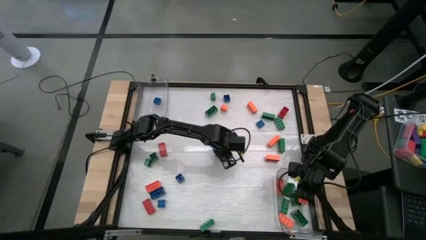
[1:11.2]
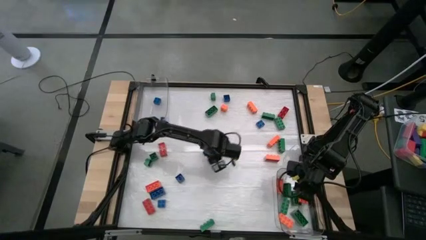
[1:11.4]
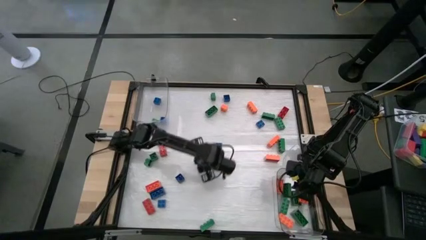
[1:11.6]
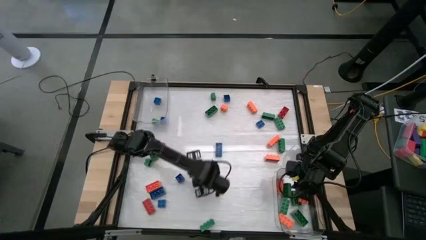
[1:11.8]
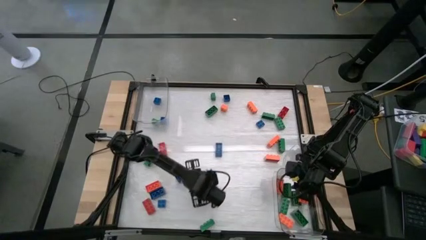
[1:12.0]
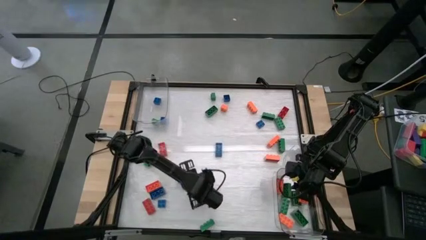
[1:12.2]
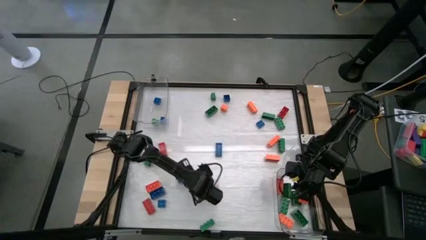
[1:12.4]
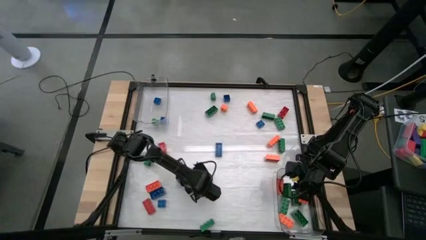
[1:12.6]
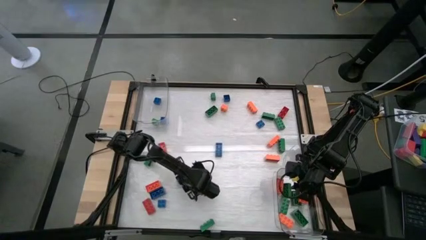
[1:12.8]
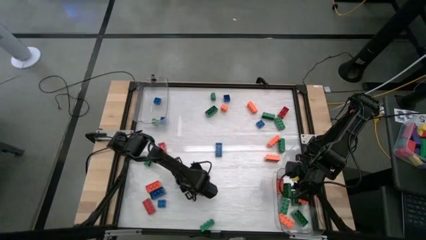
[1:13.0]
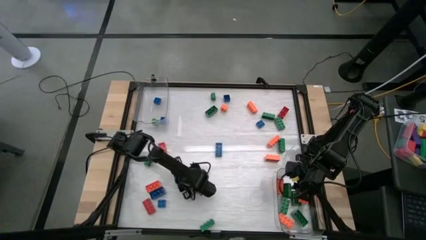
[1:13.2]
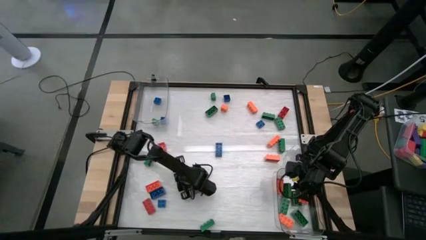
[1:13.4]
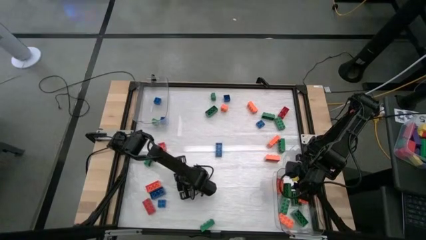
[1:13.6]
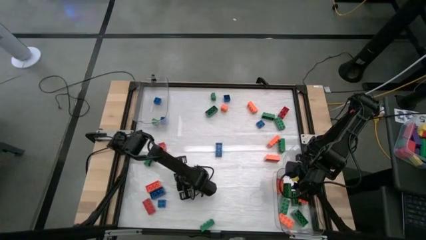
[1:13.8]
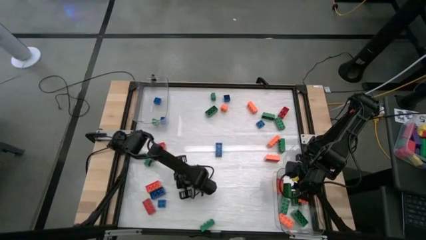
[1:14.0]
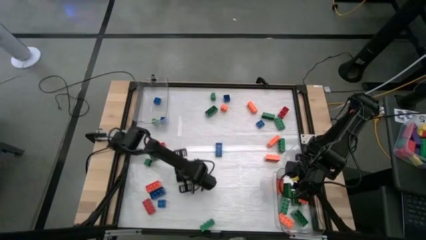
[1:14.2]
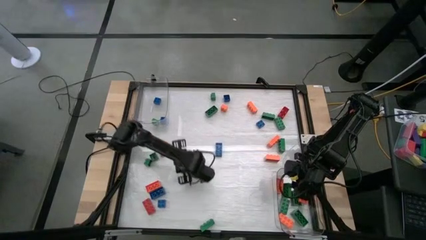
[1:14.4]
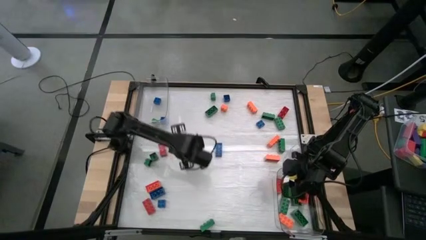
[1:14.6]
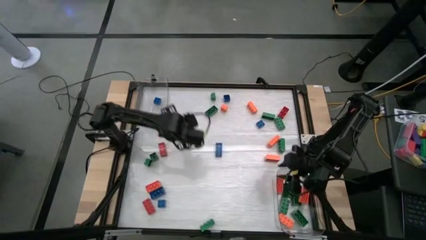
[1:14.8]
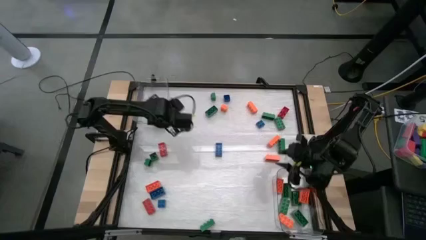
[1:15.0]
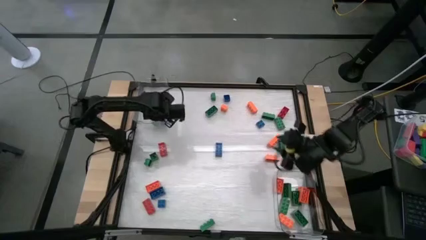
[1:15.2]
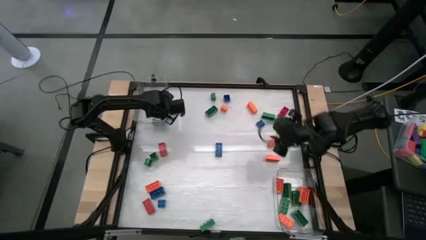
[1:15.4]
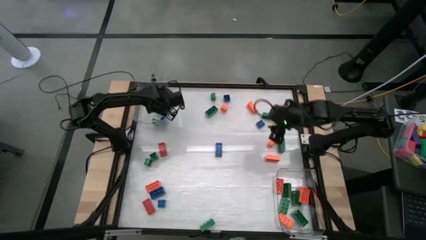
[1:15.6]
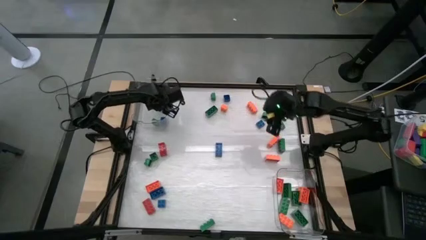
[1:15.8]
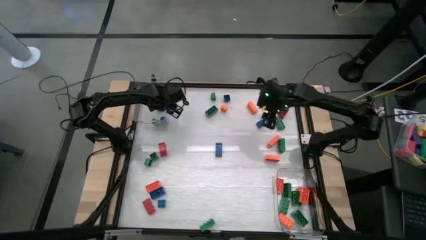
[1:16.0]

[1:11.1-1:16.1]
Task: Sort blocks by size
Put the 4 stud blue game piece into the top transparent bin

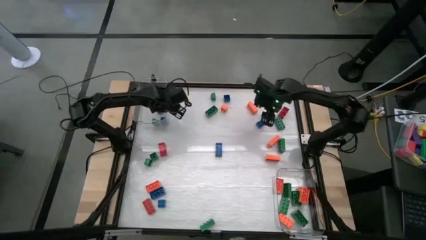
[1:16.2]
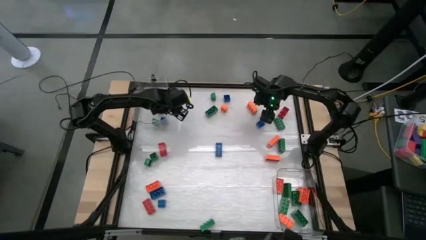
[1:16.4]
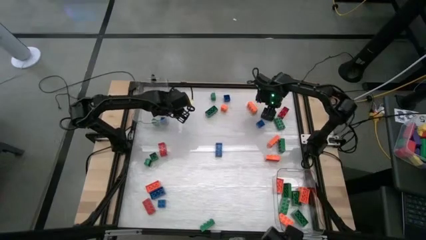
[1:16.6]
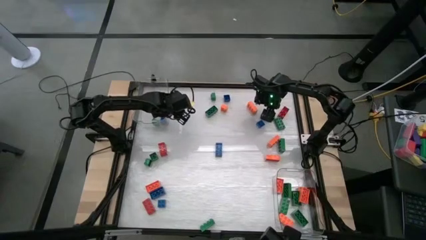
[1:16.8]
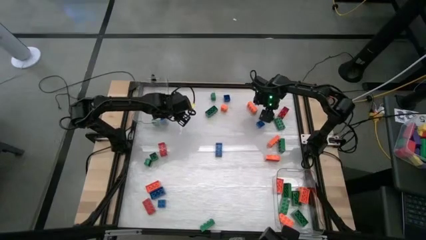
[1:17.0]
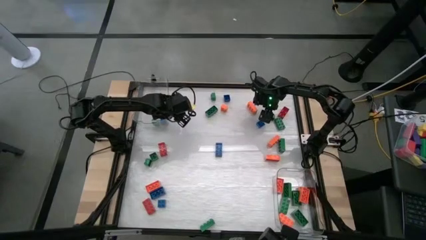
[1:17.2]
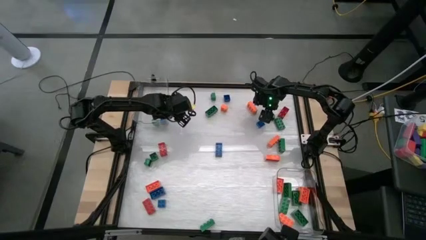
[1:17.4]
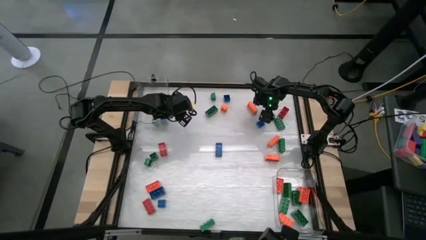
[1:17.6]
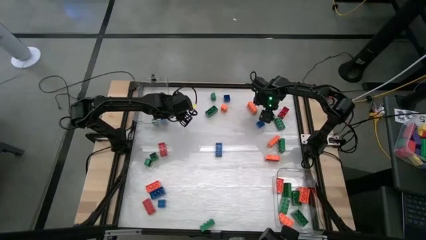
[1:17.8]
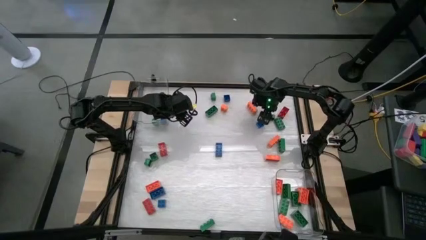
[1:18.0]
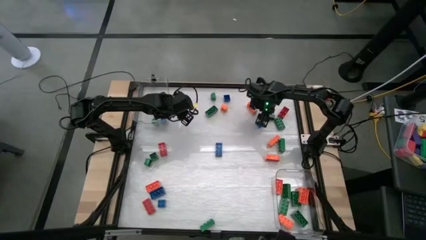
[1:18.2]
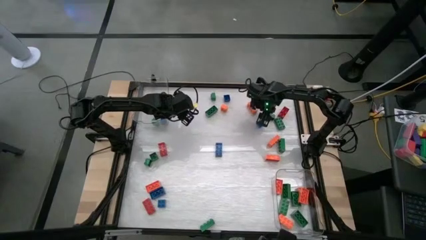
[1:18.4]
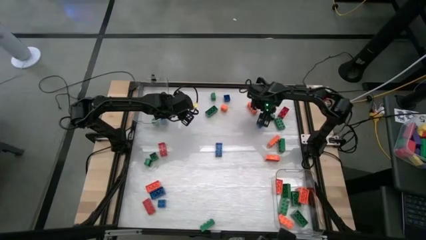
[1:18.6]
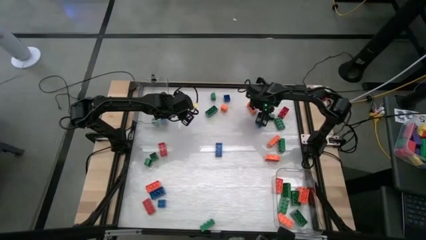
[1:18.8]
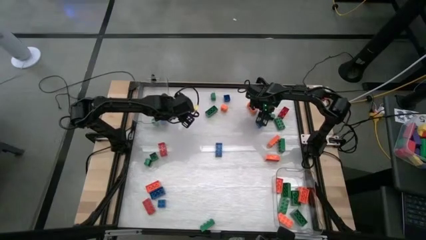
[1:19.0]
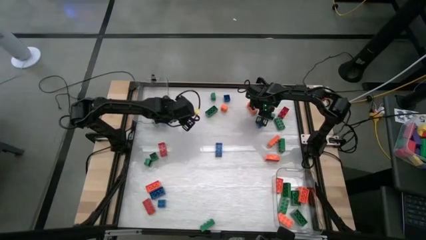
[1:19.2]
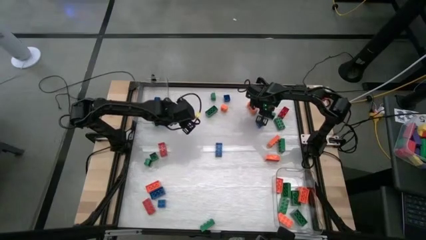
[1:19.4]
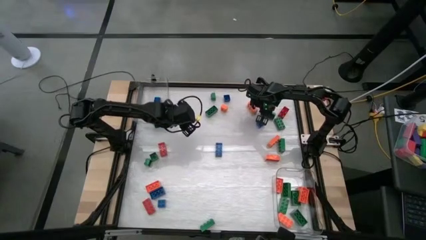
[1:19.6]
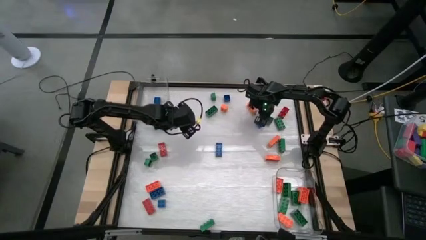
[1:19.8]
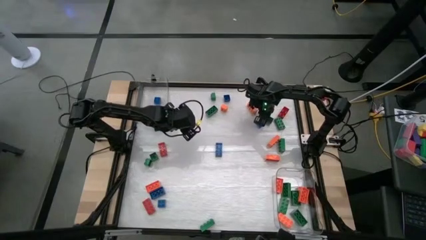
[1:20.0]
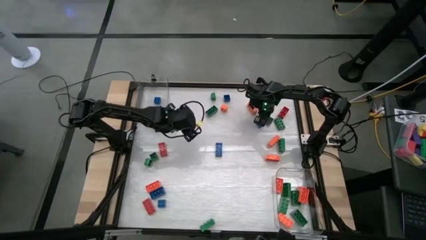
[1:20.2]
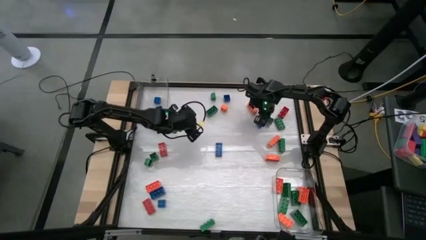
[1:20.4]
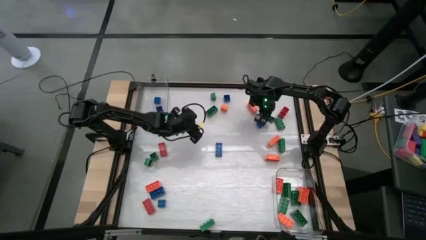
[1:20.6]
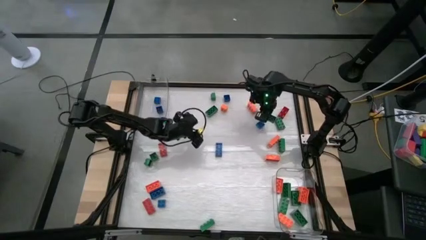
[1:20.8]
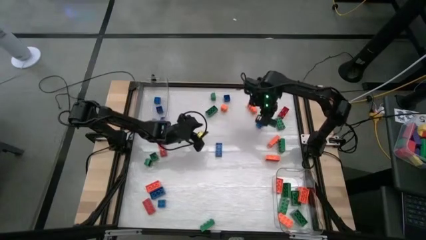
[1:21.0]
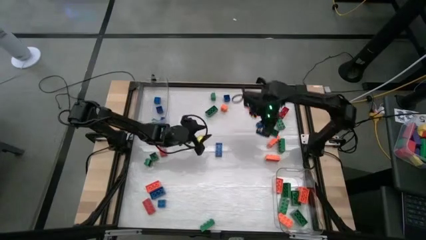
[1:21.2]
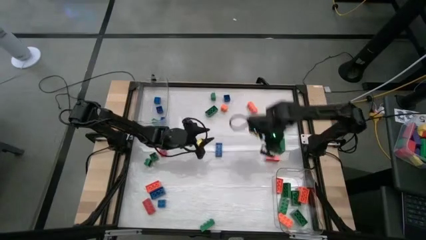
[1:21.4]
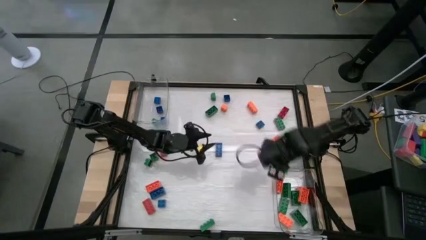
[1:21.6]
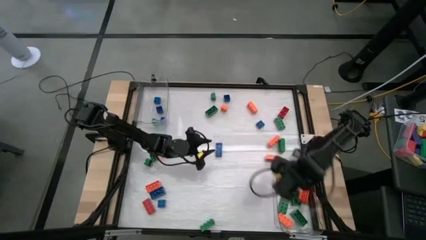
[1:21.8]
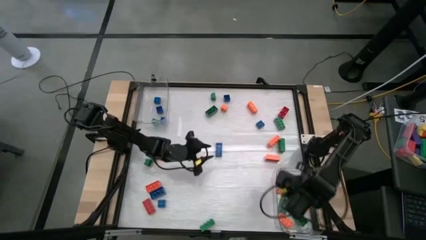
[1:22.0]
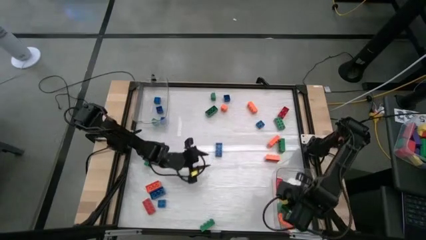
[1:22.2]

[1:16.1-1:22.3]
Put the 8 stud green game piece into the bottom transparent bin

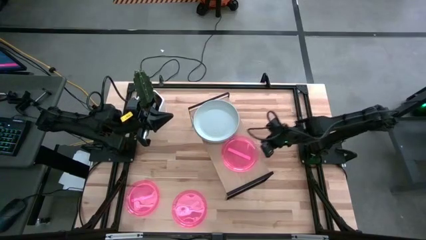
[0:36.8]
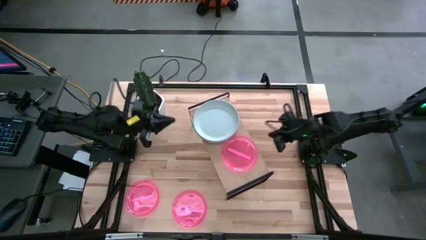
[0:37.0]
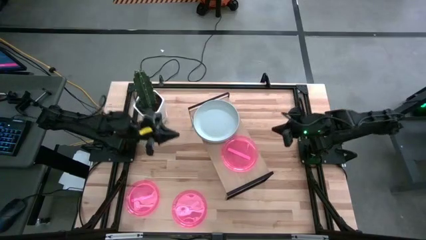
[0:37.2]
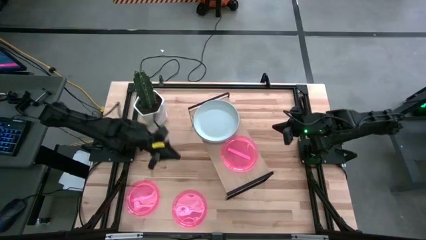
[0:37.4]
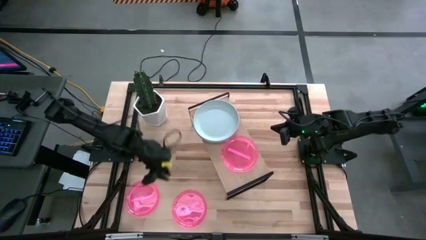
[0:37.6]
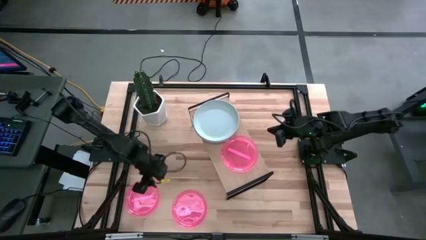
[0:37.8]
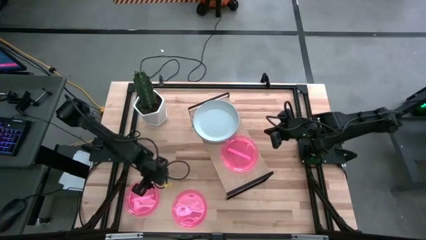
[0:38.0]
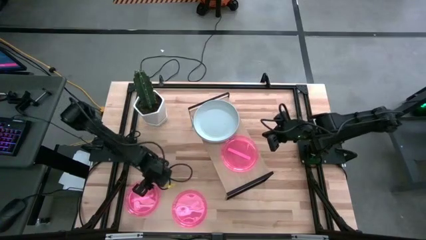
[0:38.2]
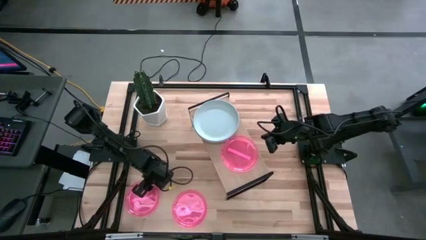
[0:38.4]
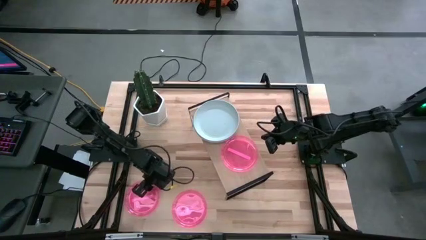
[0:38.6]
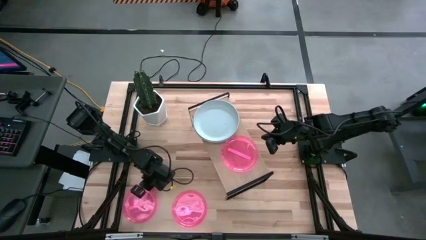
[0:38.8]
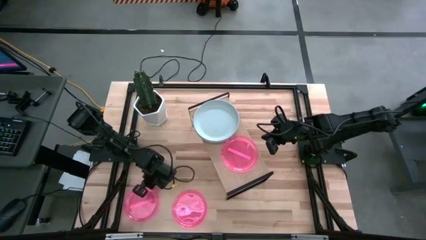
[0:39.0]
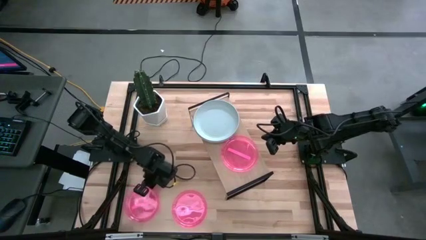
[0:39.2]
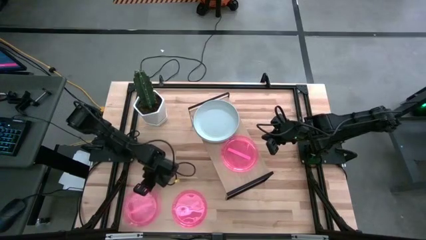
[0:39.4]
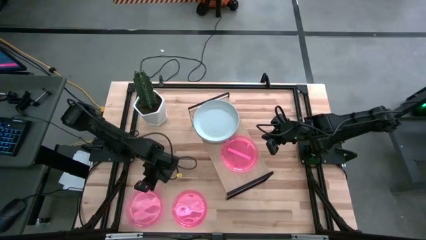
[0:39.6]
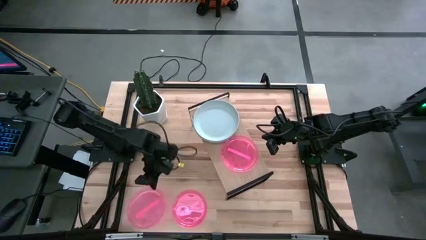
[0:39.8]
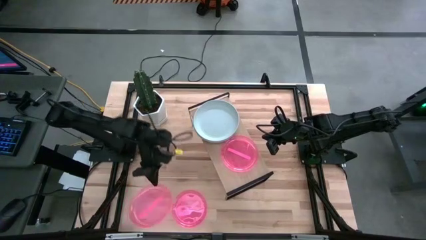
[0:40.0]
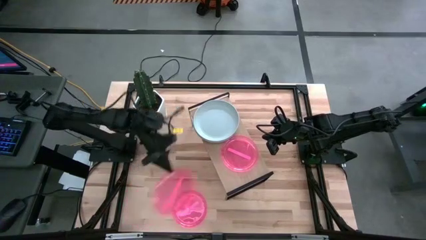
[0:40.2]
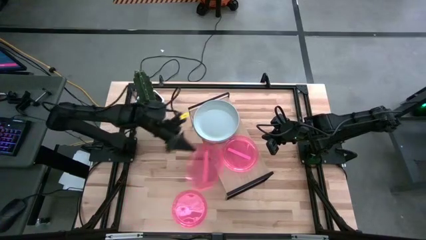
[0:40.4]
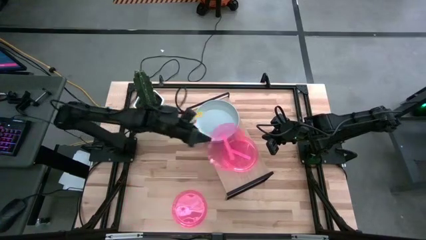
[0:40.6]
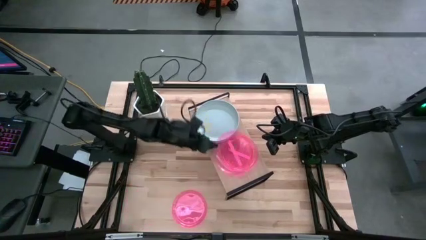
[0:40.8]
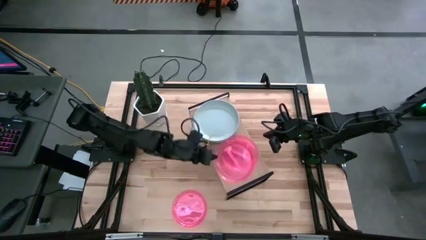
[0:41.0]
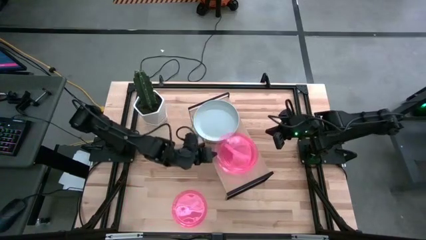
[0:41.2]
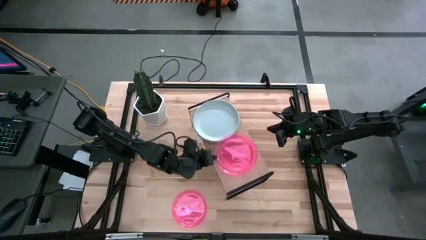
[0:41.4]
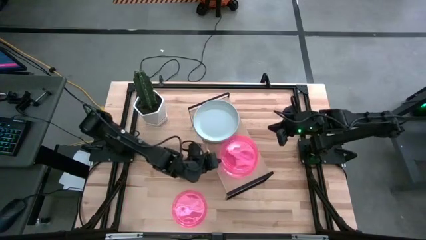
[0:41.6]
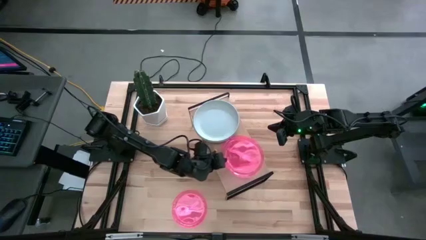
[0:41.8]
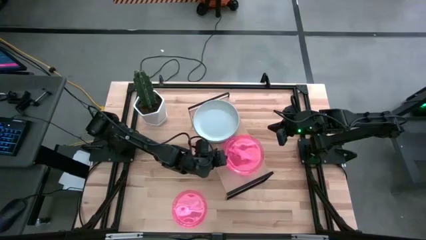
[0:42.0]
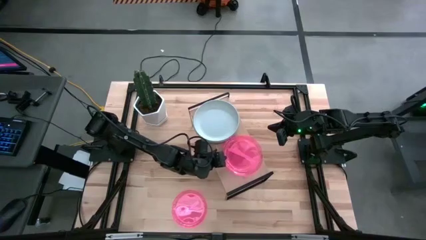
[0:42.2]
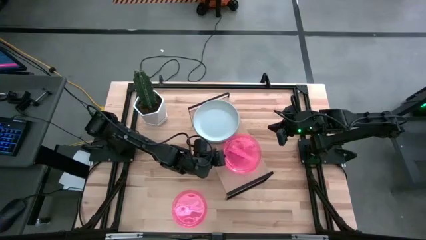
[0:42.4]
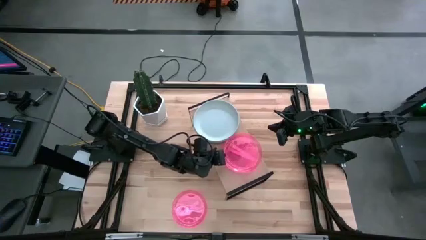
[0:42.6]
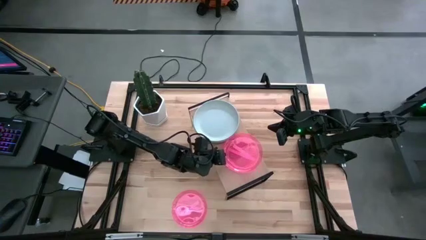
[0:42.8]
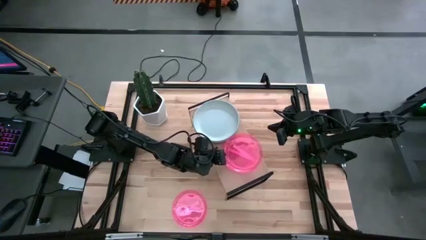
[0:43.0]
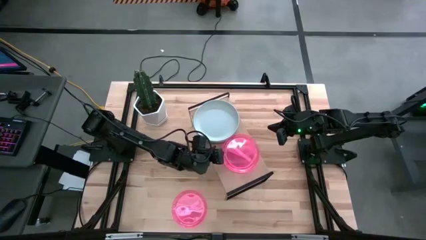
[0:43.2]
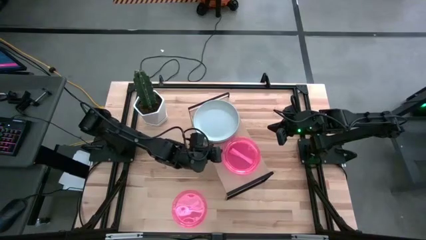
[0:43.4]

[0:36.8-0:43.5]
Task: Place and stack plates onto a shelf
Stack the left pink transparent plate on top of the pink plate on the shelf
